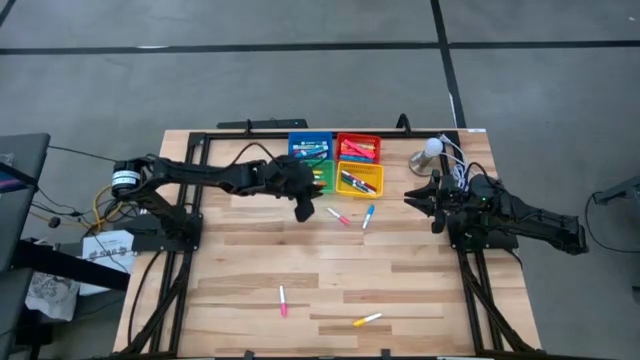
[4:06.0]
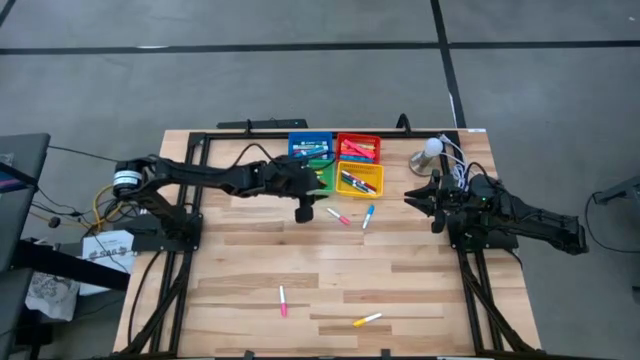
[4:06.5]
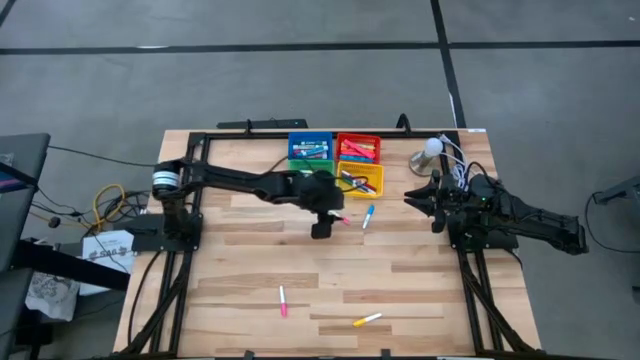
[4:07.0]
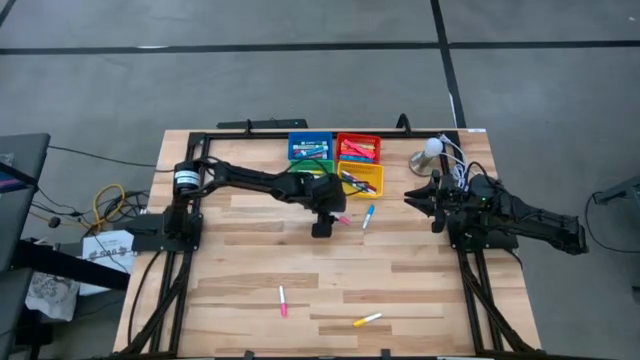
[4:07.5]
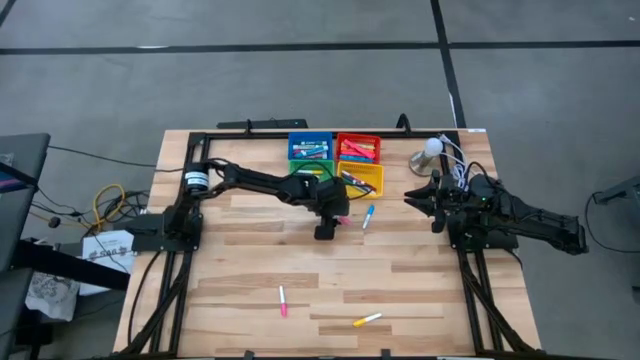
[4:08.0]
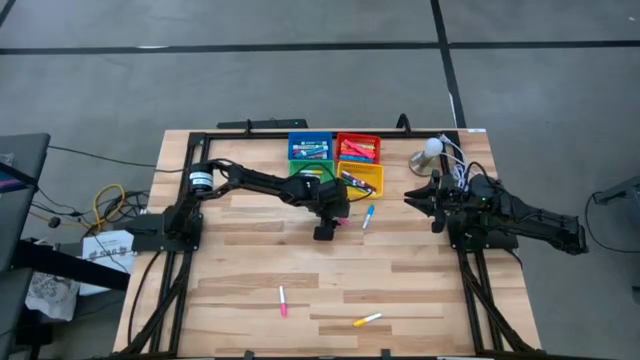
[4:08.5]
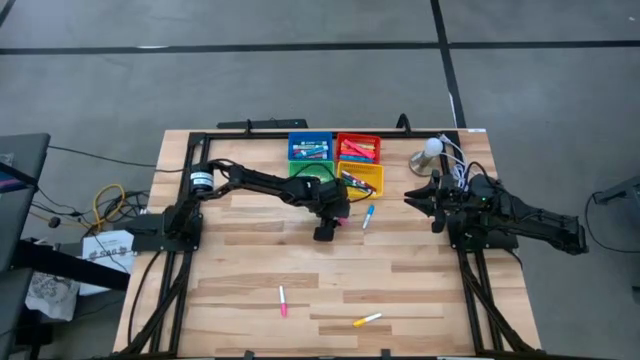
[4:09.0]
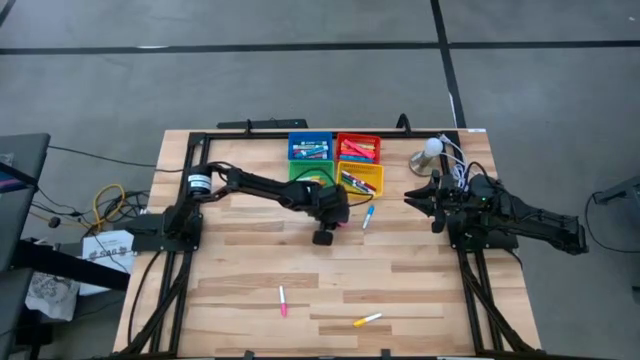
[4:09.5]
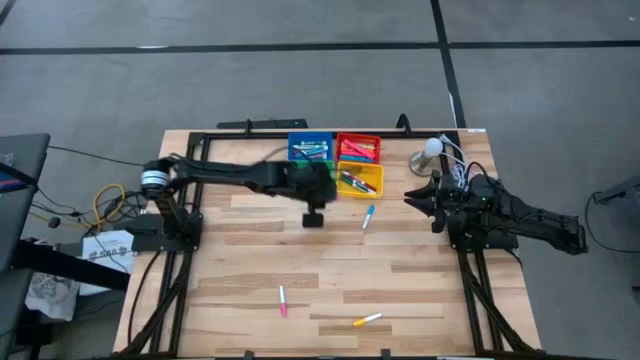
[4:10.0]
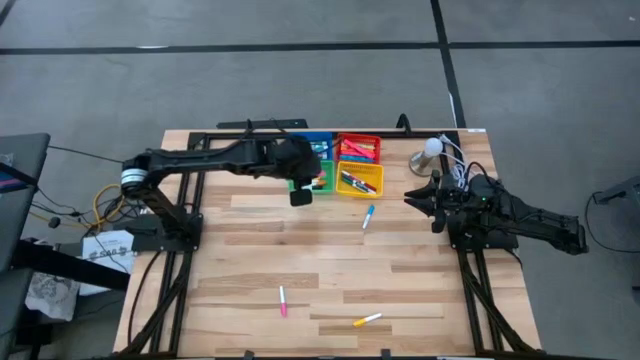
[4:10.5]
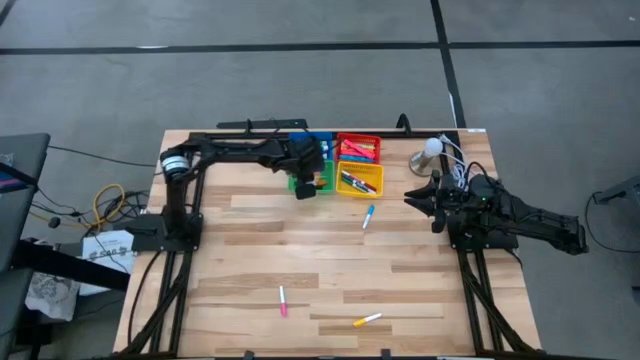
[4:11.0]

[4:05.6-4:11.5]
Task: Pick & Place Markers
Put the pink highlighter in the green bin

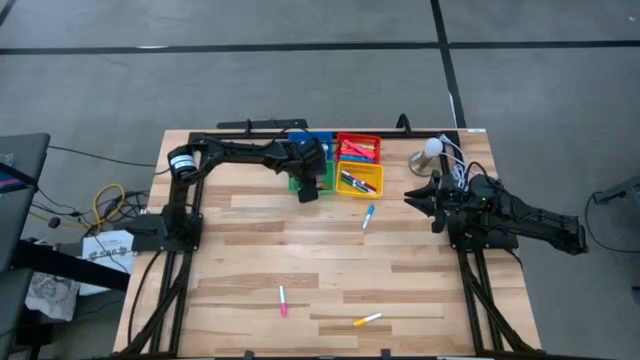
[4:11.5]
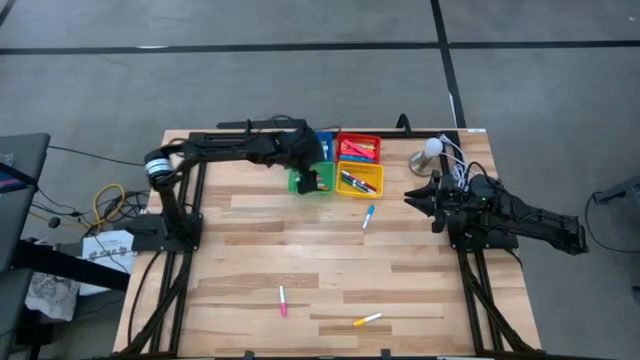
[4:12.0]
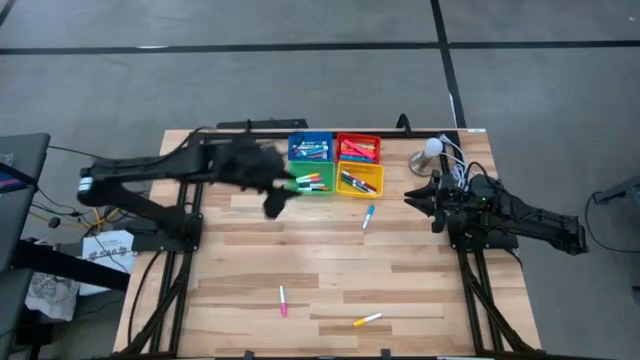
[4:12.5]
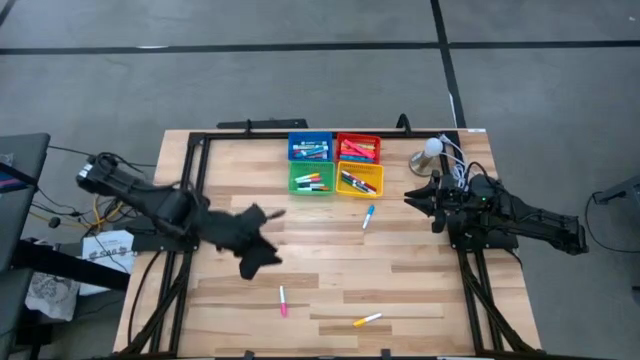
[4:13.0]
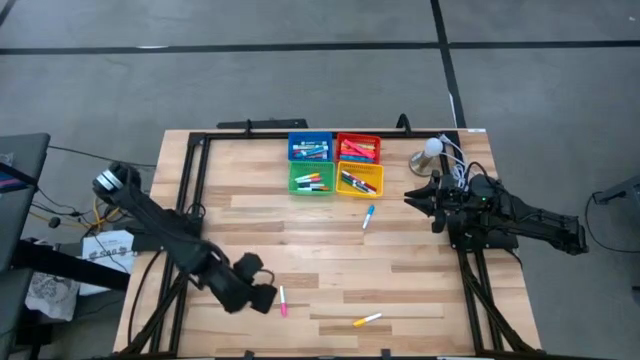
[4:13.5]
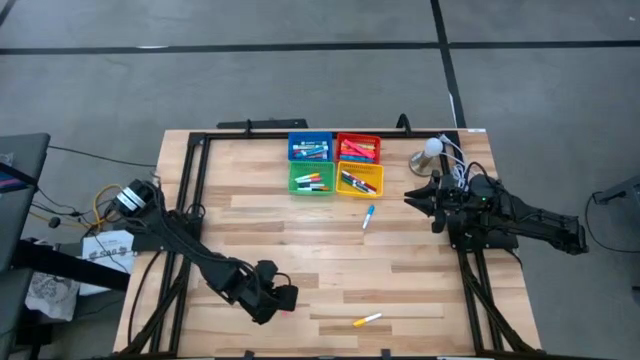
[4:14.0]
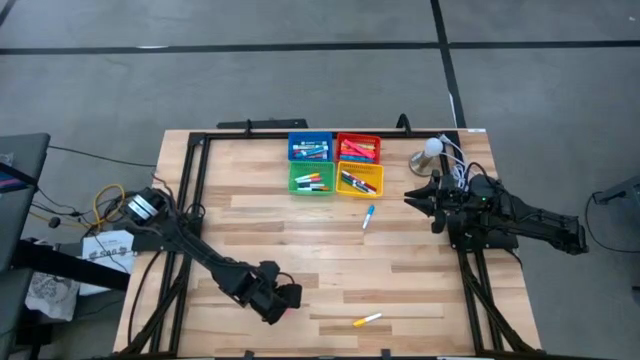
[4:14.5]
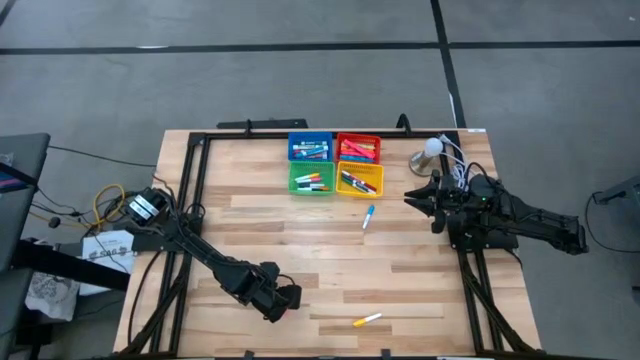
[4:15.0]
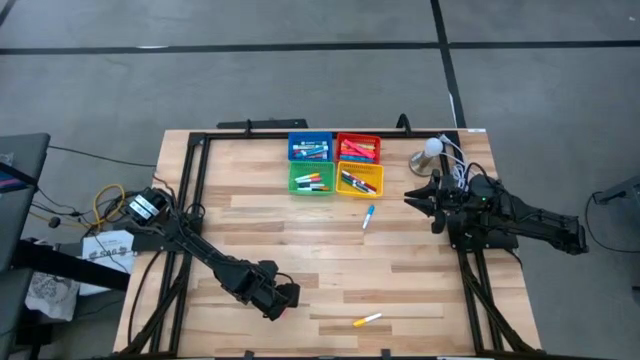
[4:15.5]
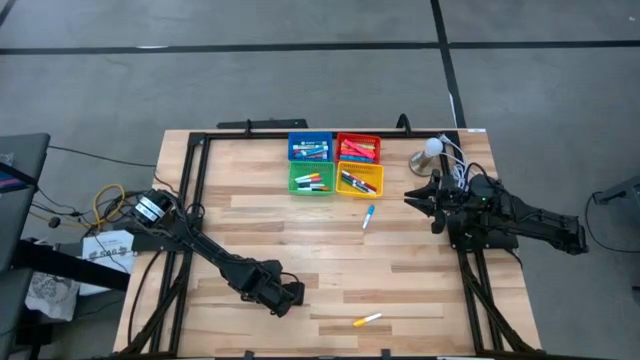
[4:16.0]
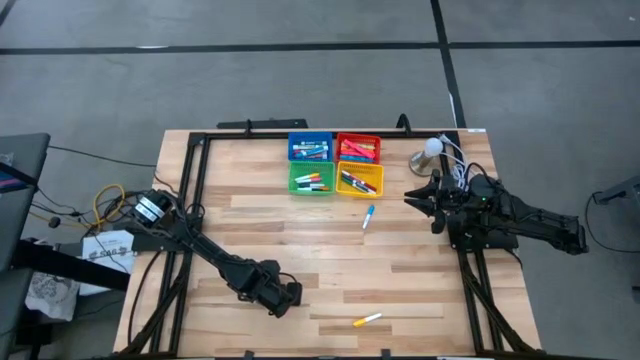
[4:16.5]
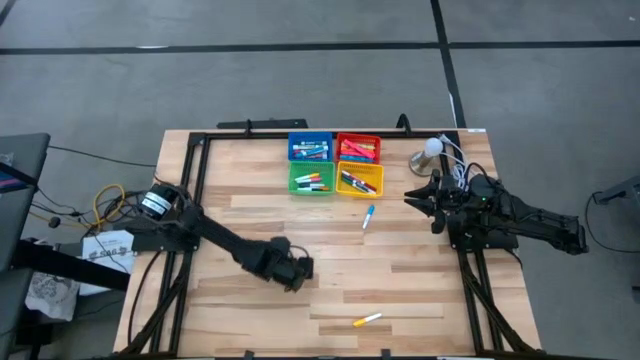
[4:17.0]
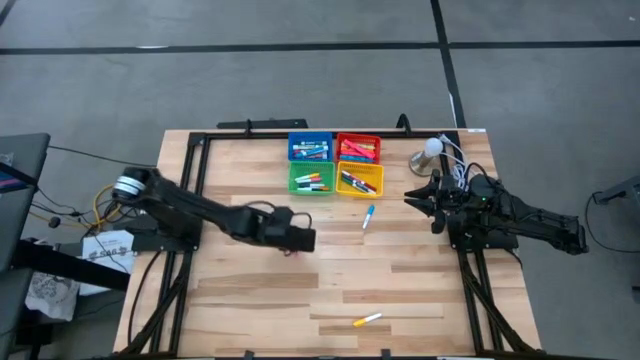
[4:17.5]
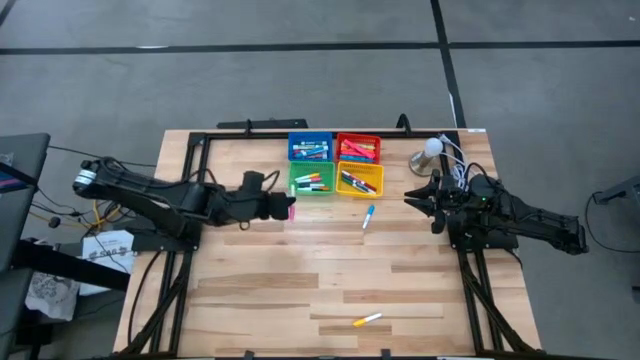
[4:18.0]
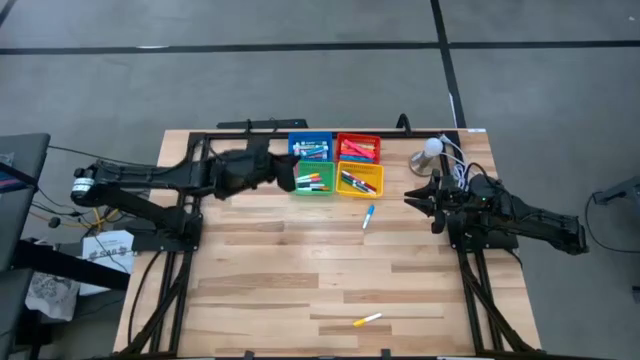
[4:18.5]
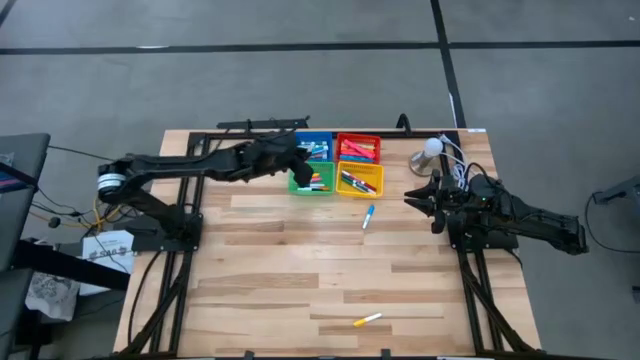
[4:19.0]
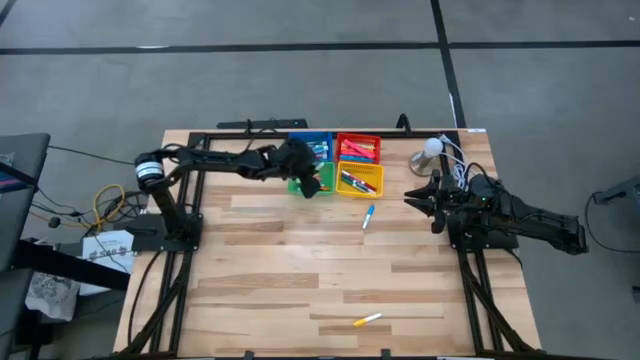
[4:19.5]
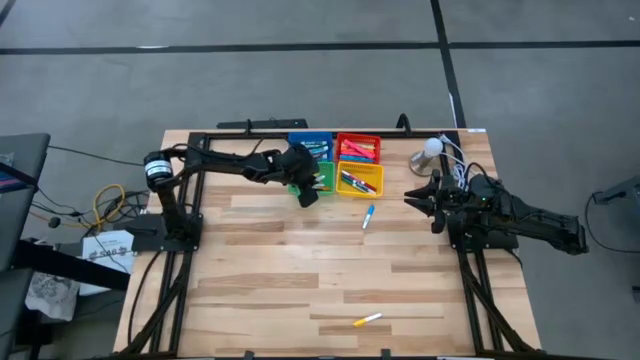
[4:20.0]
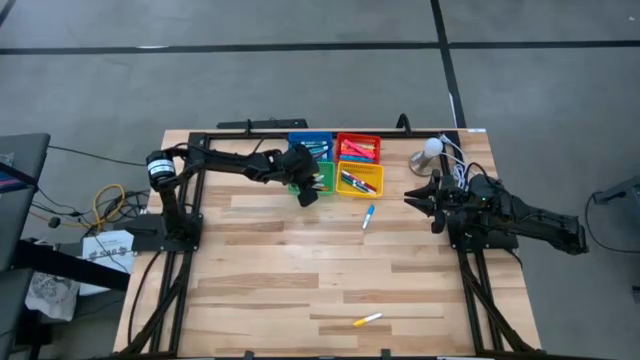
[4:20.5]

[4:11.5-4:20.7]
Put the pink highlighter in the green bin
